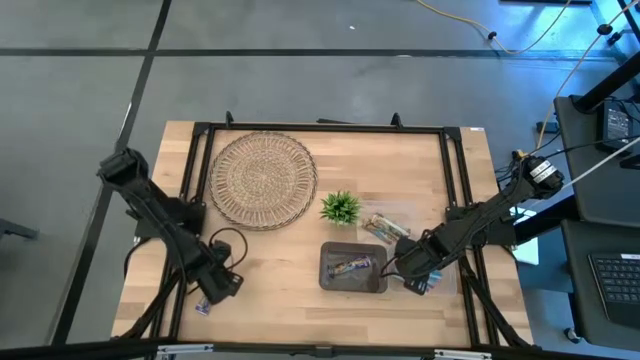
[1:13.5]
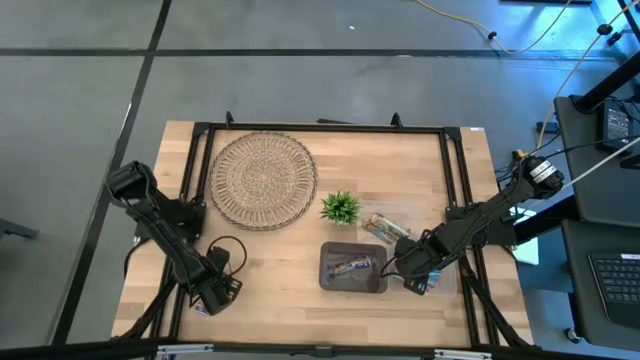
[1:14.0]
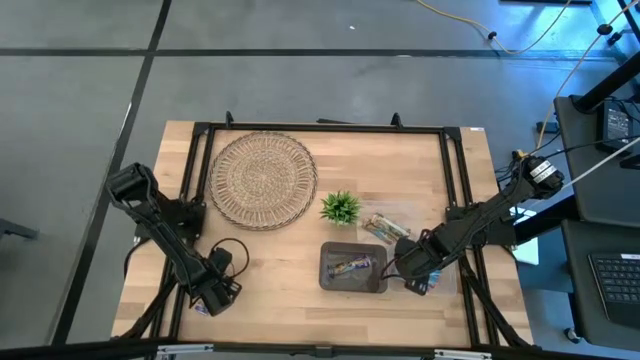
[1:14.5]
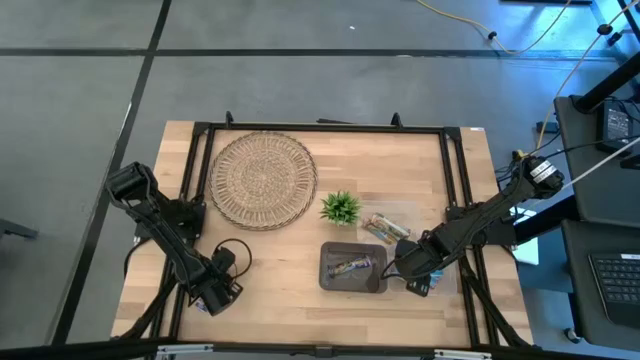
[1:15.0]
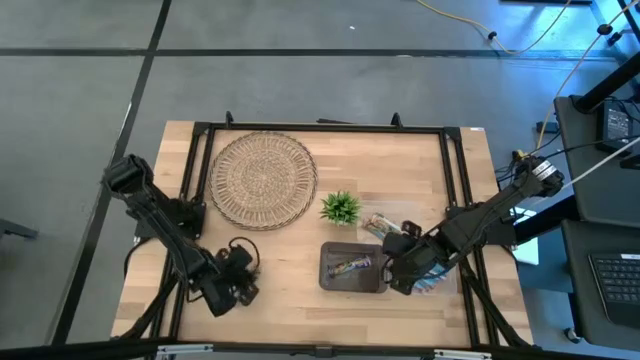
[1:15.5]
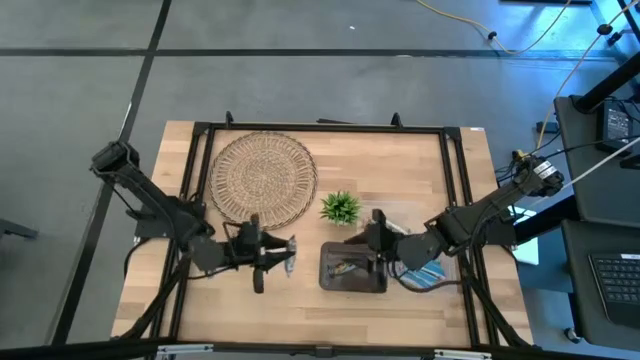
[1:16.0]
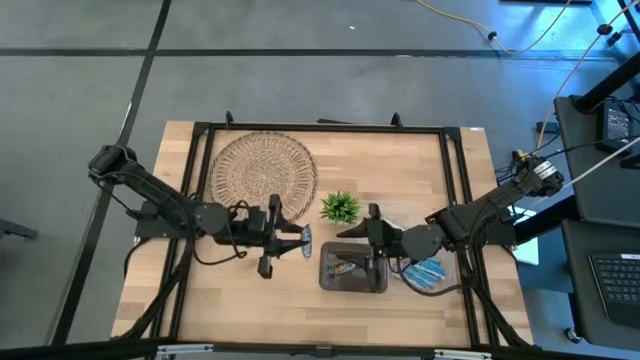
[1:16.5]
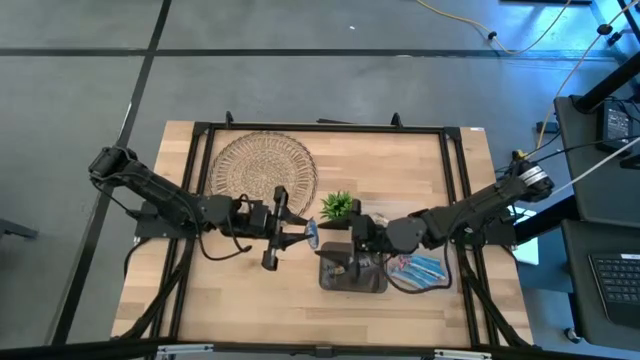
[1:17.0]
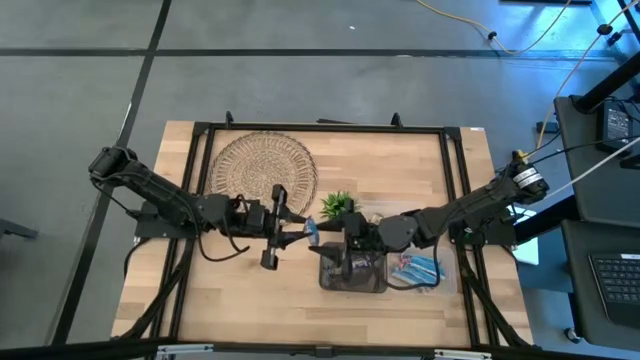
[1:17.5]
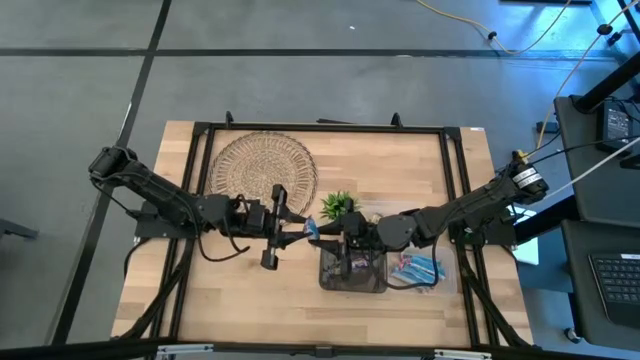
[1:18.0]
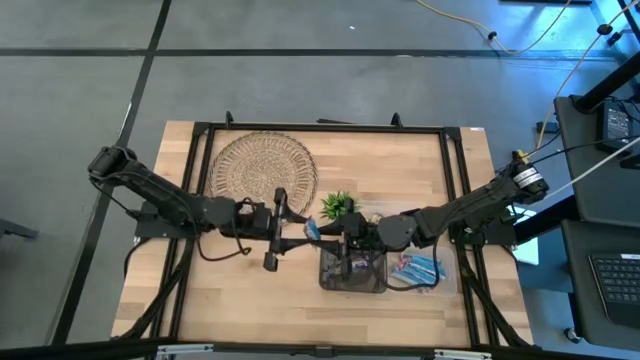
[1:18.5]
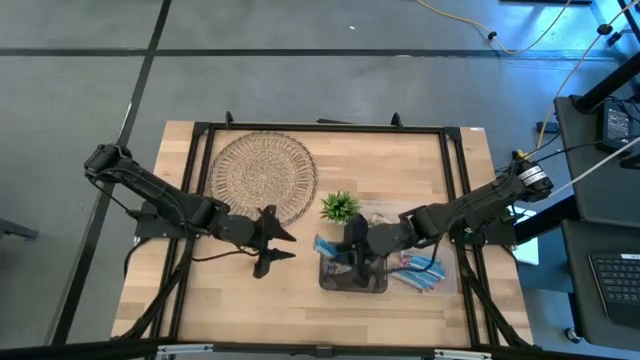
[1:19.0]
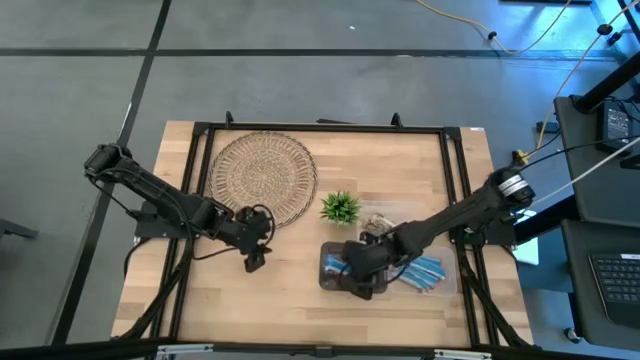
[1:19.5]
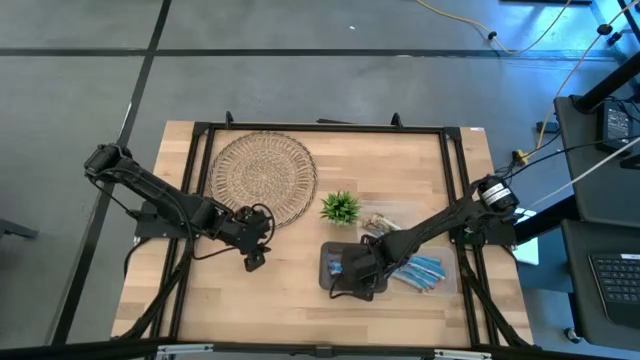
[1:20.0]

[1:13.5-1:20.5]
Task: Pick and place Granola Bars by type
Put the violet granola bar into the black bin

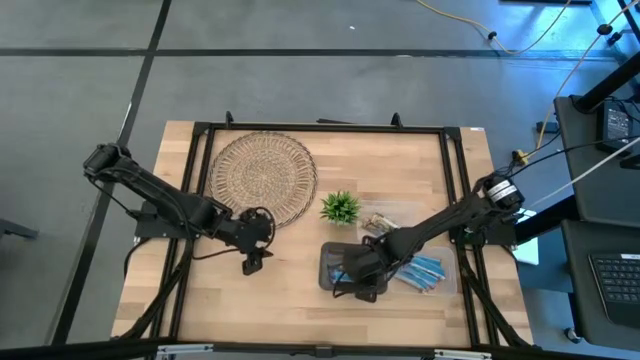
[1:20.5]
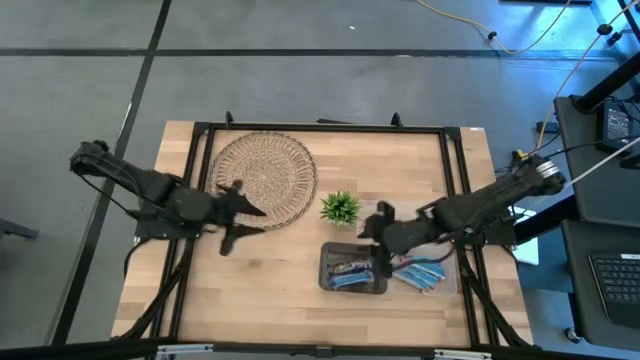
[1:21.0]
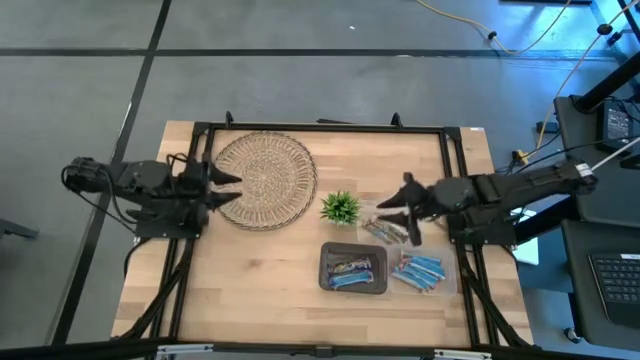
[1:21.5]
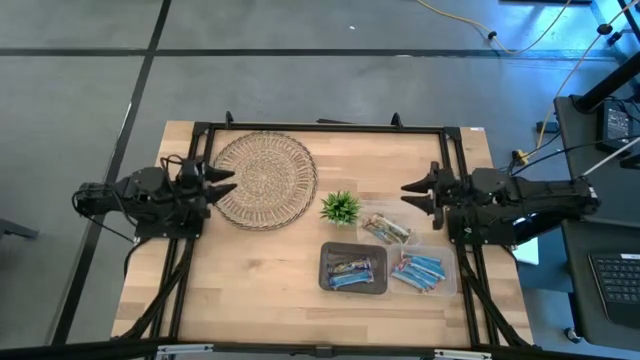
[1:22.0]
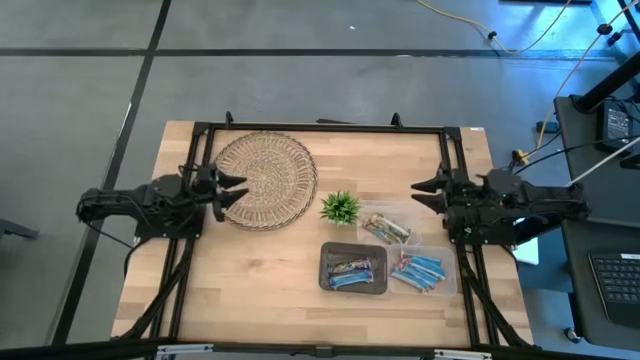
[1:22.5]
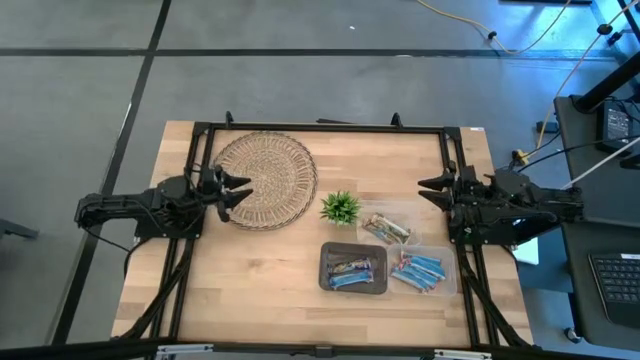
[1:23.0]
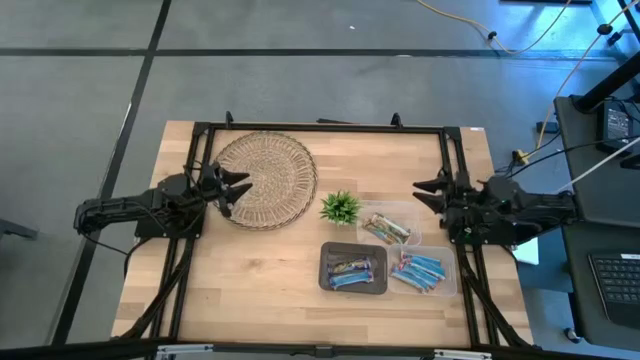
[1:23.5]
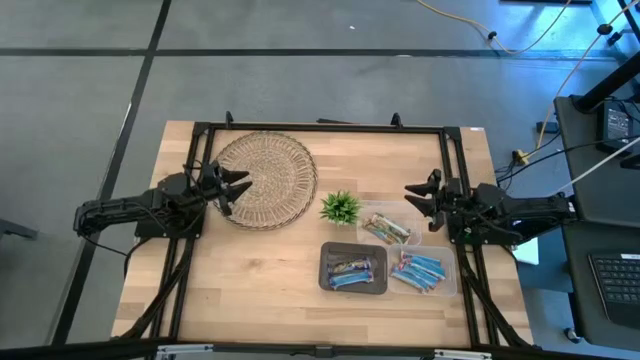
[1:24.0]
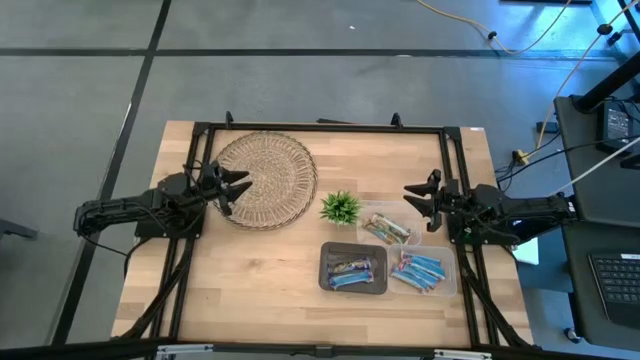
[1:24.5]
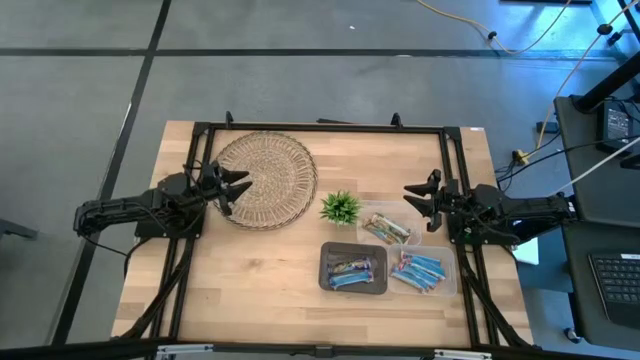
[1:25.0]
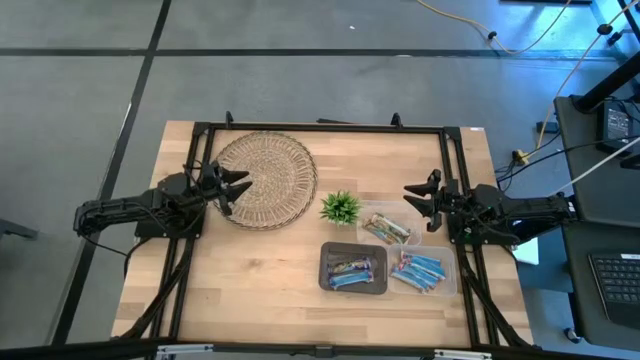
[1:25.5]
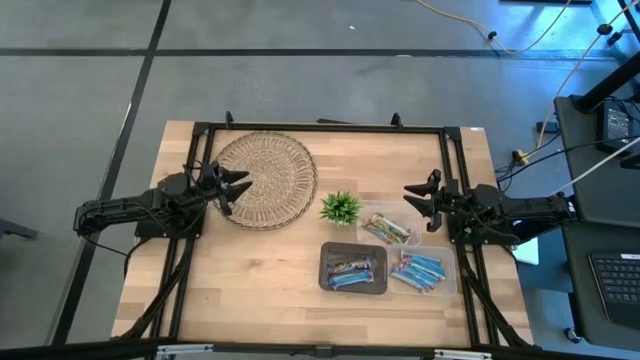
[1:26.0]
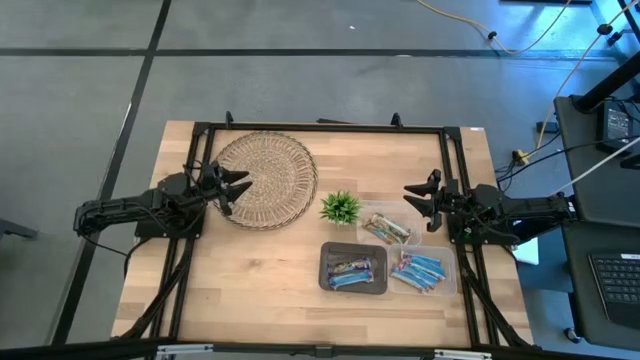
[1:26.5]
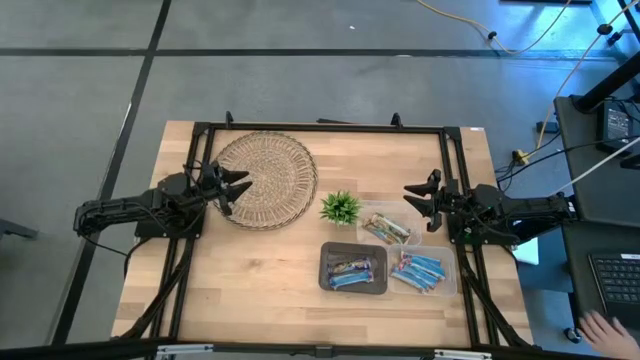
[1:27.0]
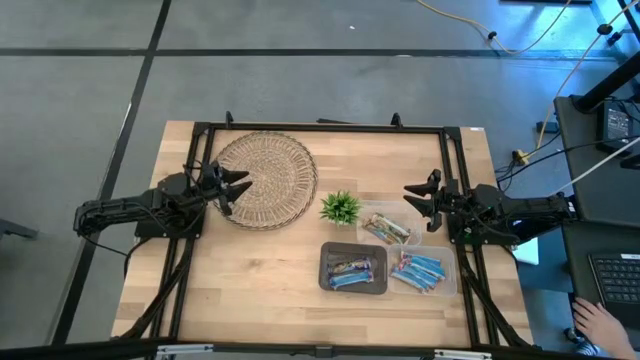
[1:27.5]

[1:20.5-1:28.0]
Return to Home Position

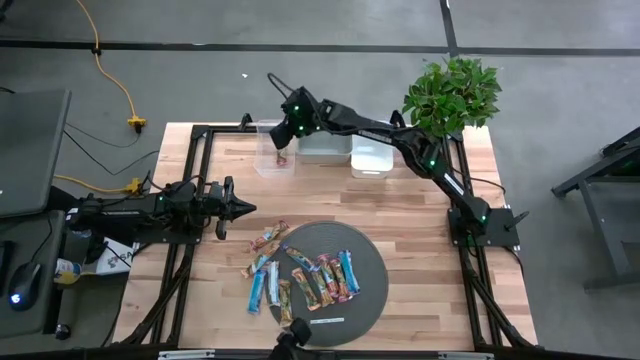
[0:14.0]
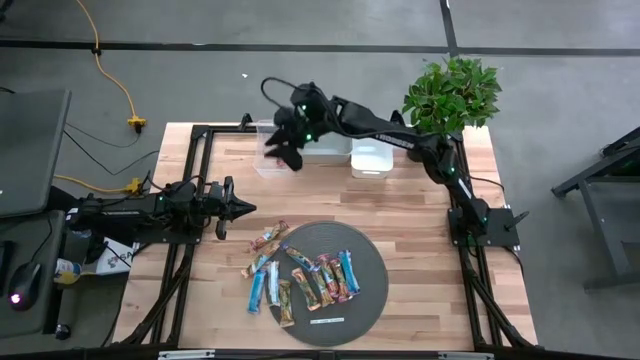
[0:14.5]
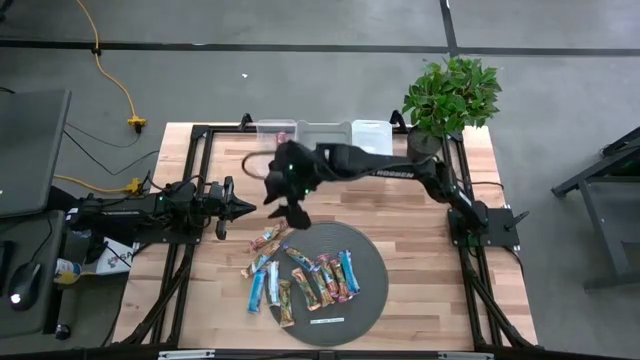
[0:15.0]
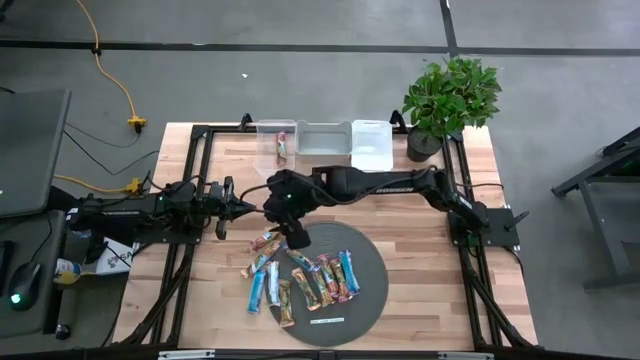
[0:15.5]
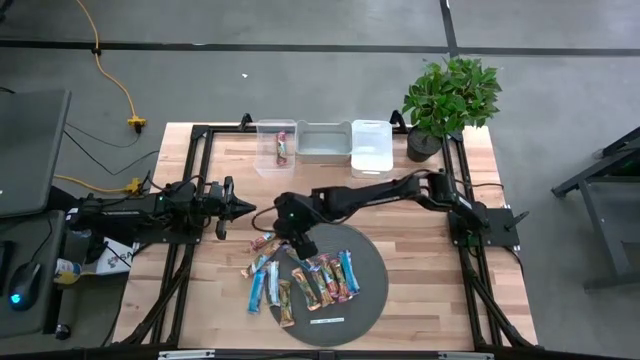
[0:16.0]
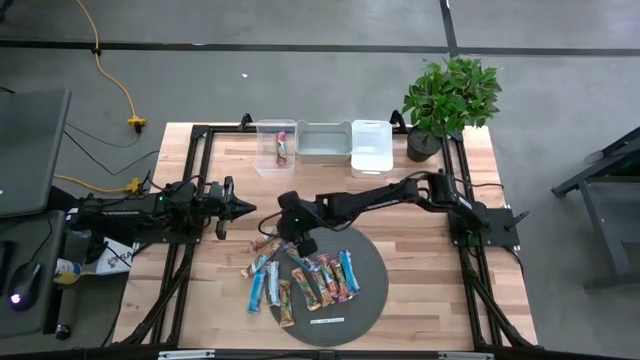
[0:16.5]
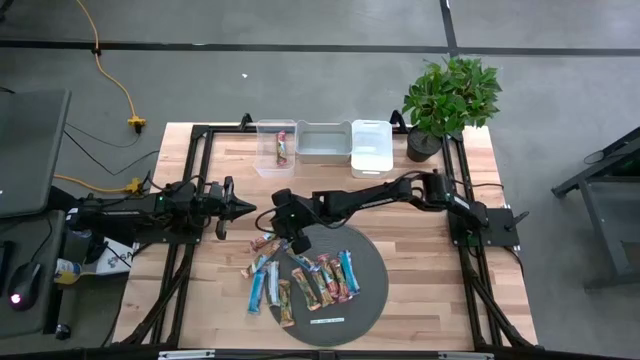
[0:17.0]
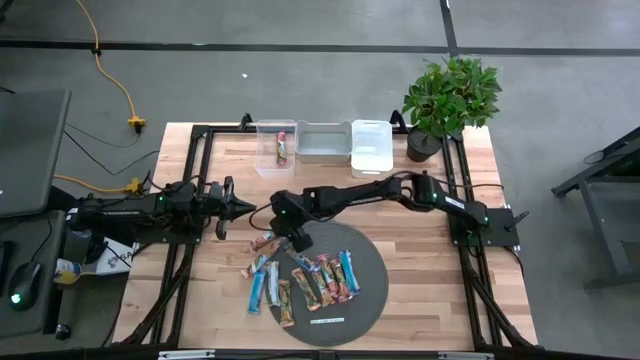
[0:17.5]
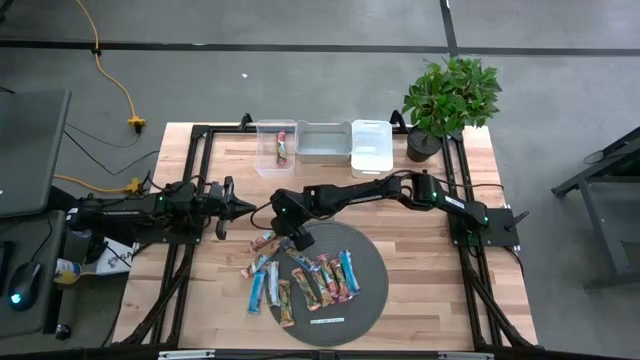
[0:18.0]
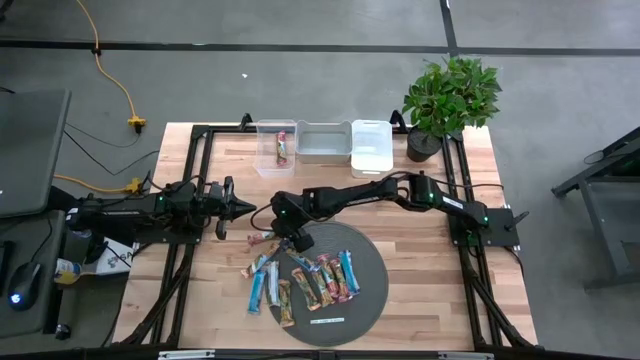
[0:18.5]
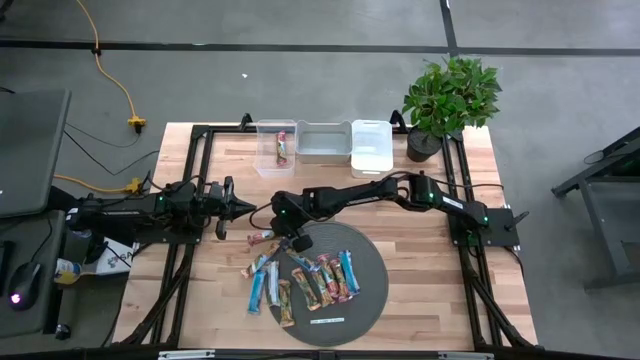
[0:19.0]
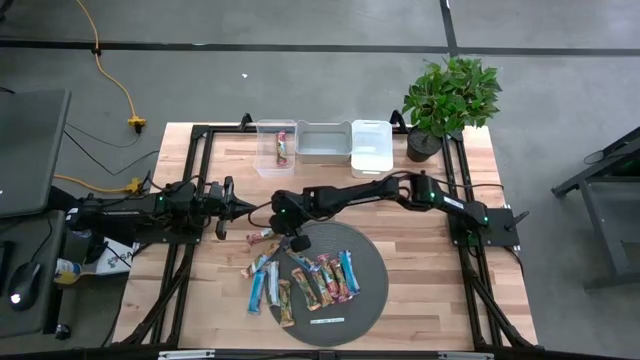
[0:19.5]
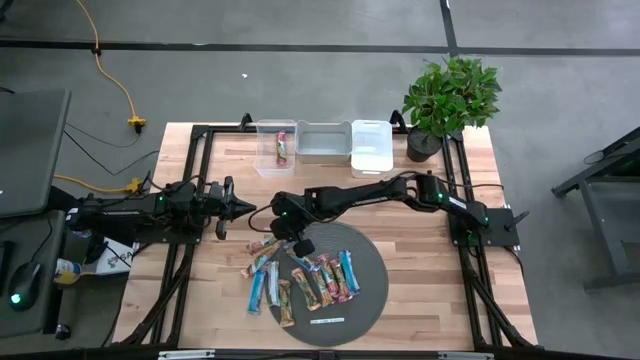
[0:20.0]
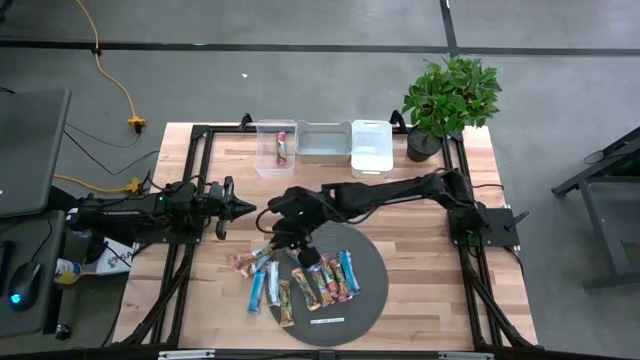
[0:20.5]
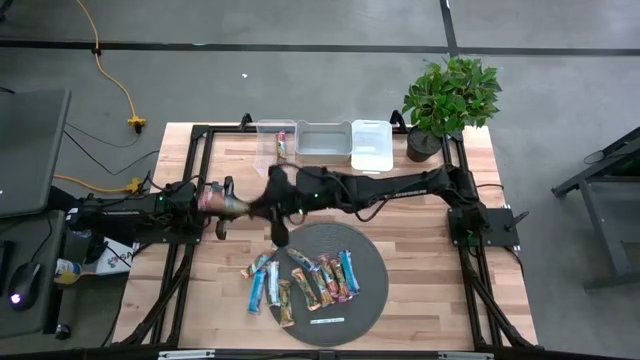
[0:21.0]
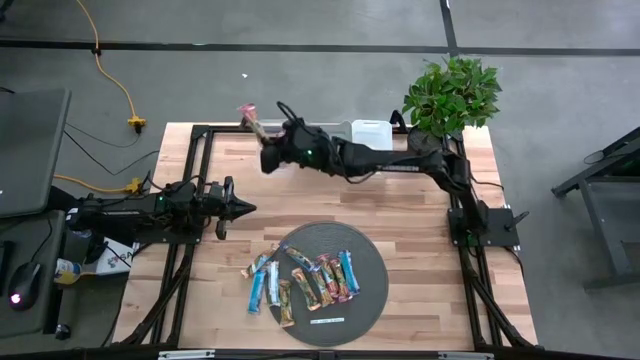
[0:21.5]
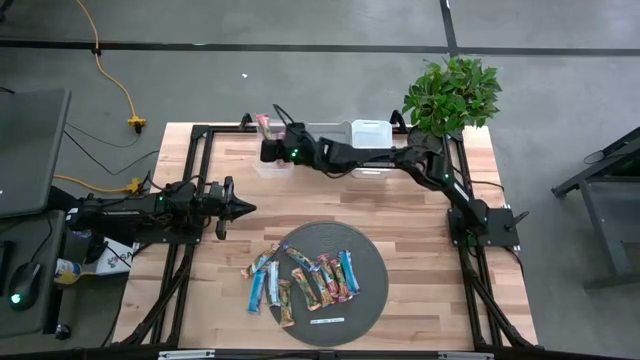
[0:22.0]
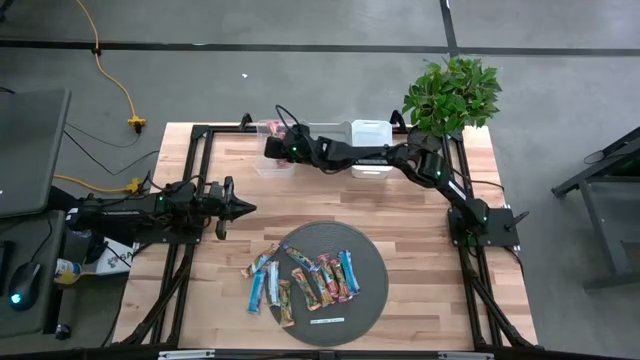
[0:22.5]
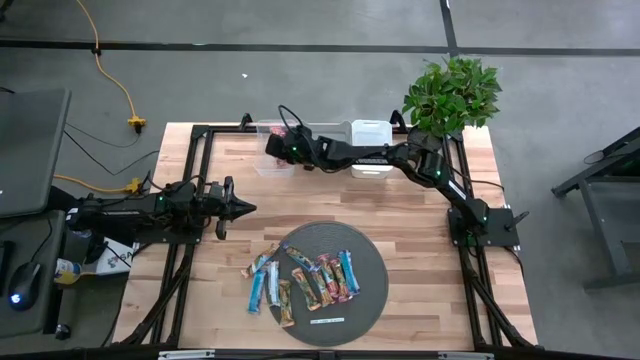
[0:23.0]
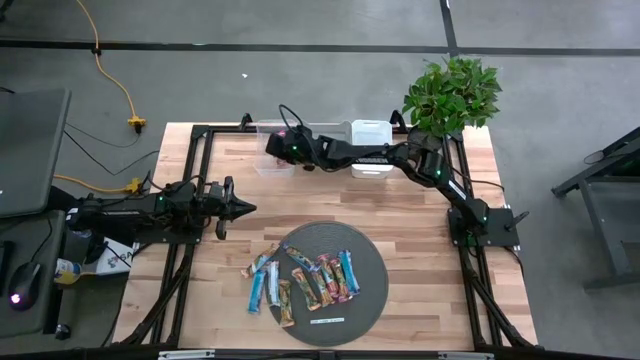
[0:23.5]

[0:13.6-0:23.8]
Task: Pick and place Granola Bars by type
Put the red granola bar into the transparent bin
